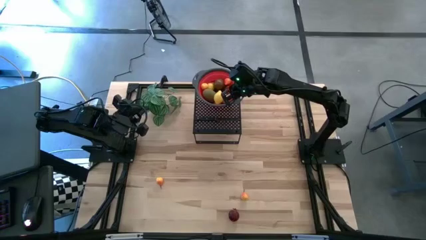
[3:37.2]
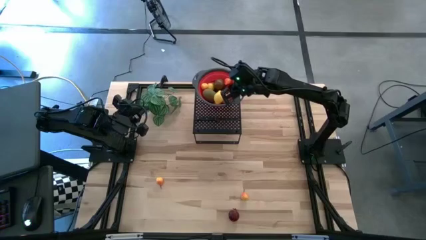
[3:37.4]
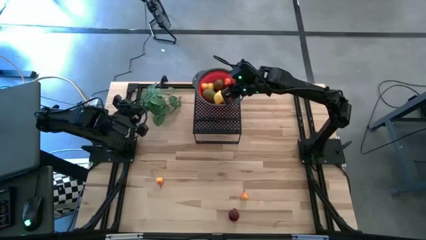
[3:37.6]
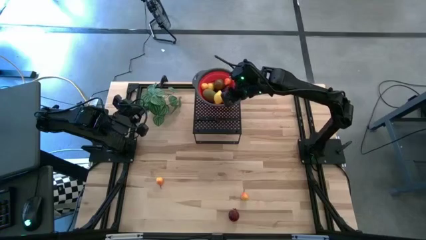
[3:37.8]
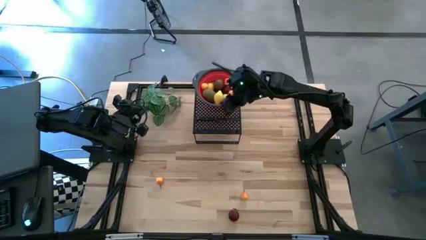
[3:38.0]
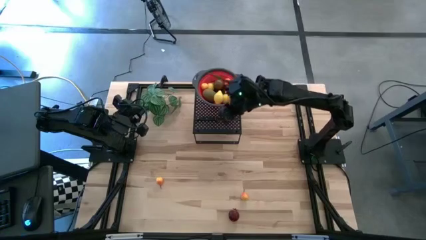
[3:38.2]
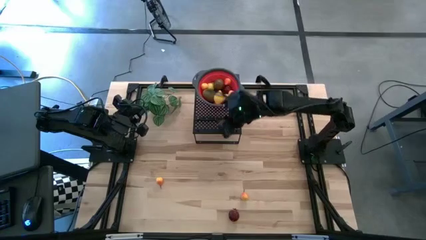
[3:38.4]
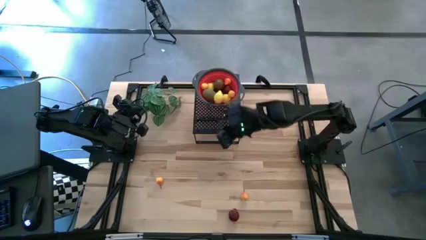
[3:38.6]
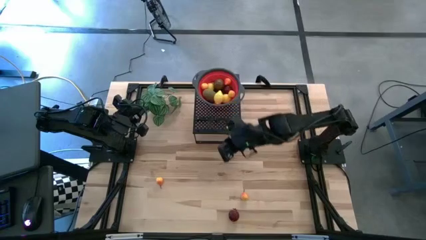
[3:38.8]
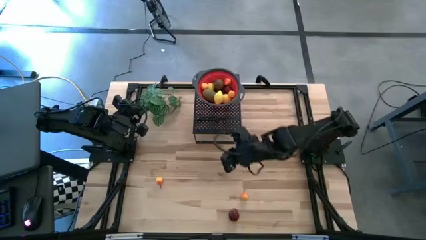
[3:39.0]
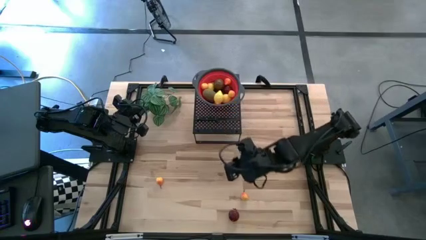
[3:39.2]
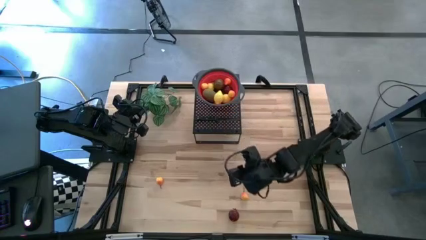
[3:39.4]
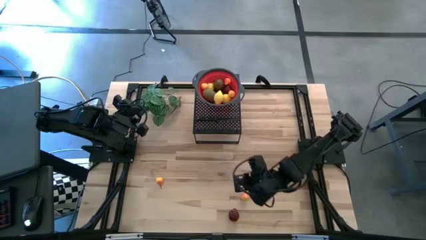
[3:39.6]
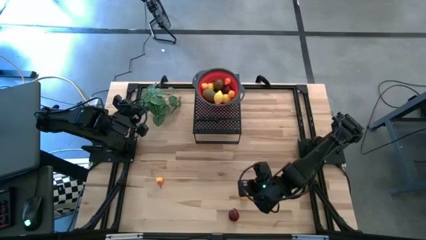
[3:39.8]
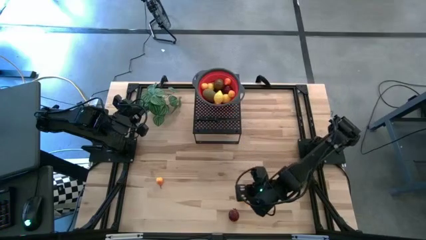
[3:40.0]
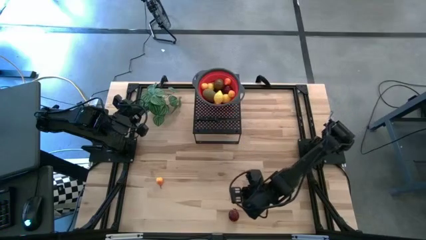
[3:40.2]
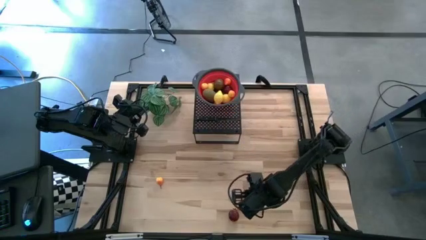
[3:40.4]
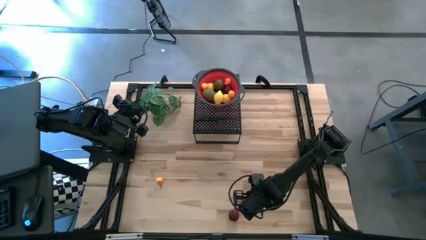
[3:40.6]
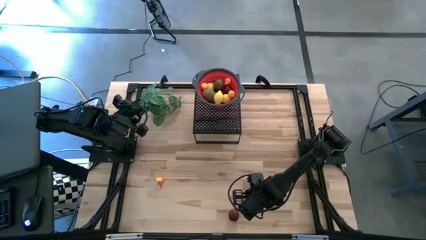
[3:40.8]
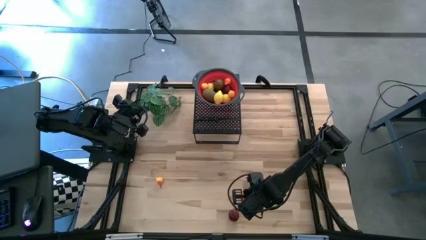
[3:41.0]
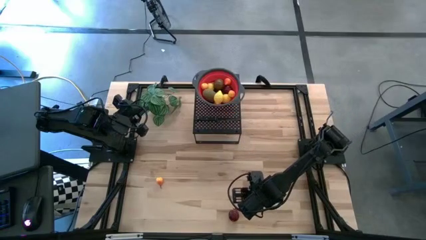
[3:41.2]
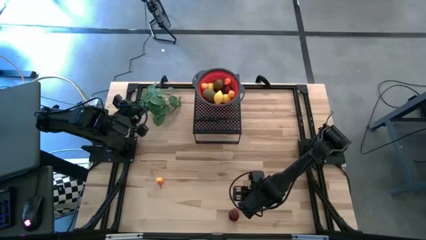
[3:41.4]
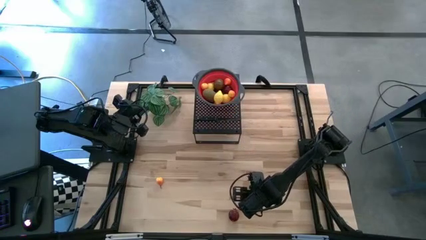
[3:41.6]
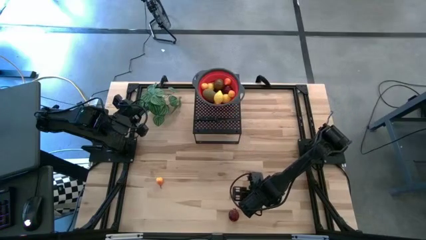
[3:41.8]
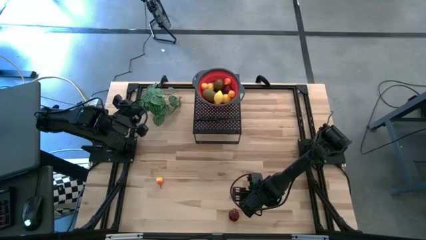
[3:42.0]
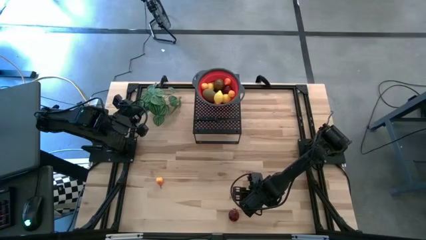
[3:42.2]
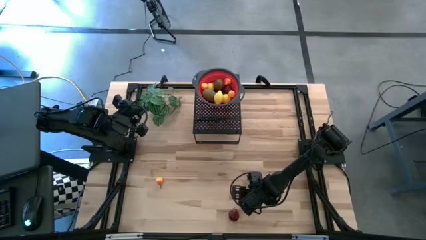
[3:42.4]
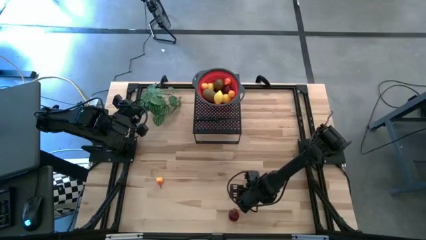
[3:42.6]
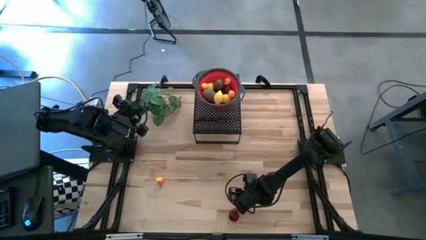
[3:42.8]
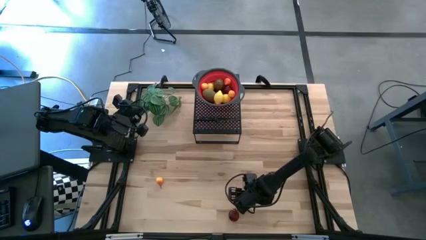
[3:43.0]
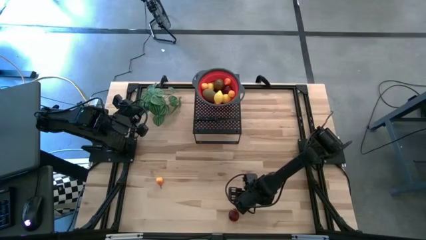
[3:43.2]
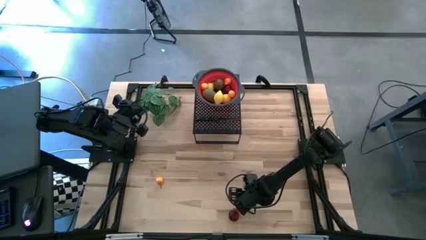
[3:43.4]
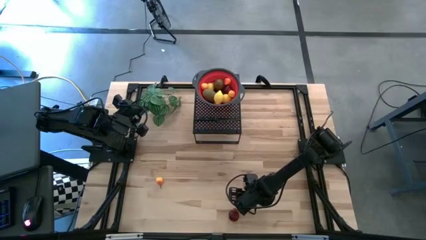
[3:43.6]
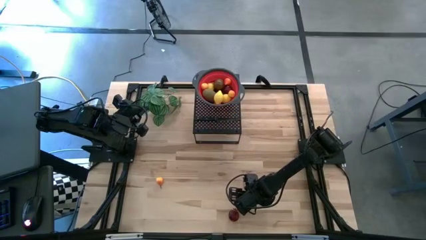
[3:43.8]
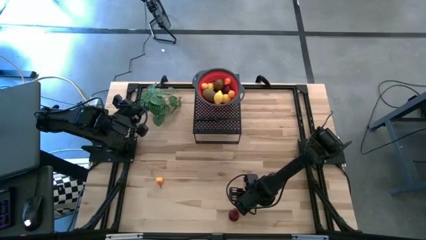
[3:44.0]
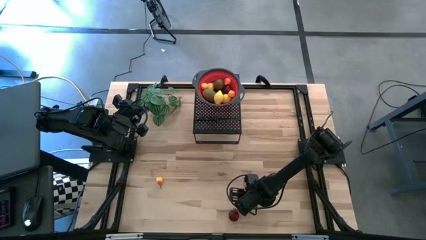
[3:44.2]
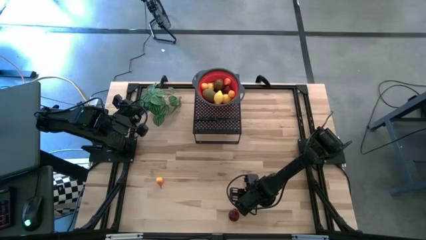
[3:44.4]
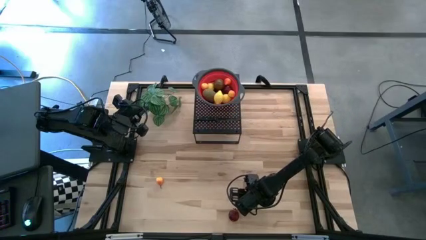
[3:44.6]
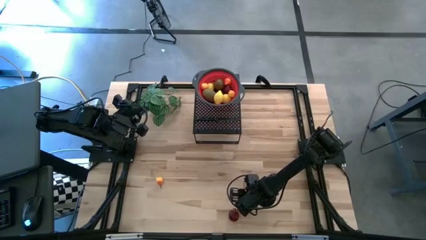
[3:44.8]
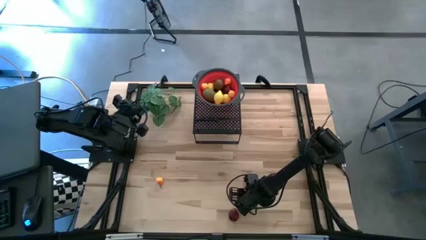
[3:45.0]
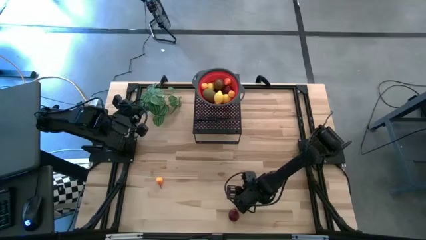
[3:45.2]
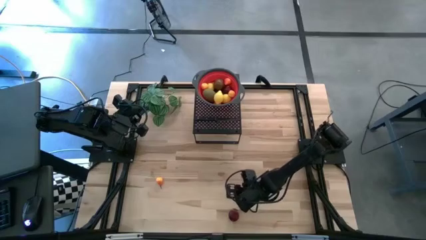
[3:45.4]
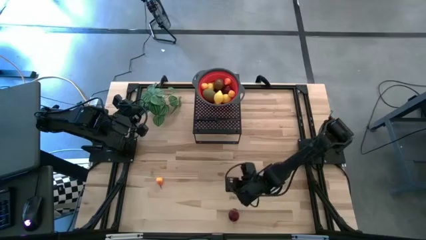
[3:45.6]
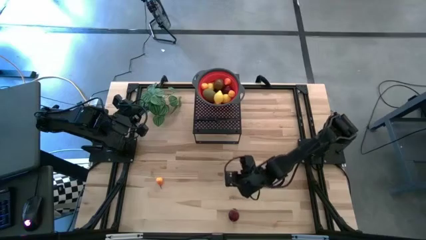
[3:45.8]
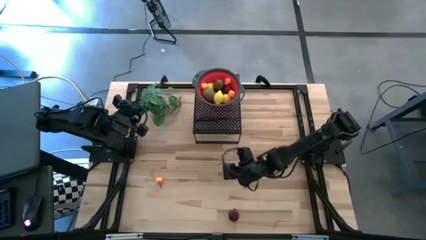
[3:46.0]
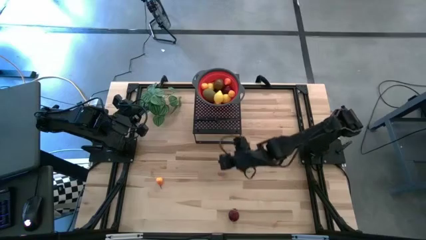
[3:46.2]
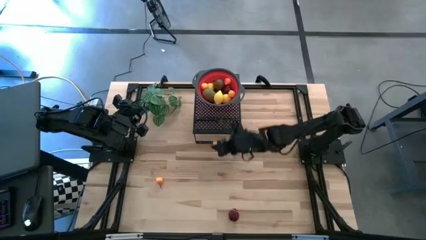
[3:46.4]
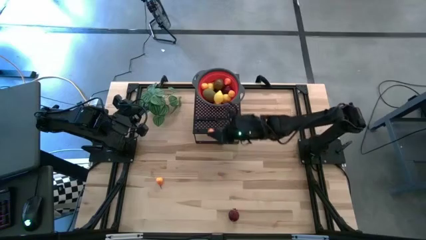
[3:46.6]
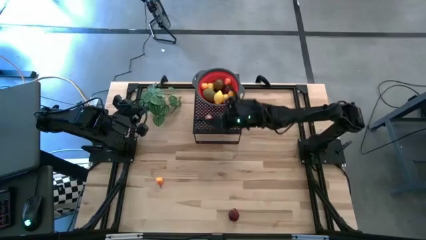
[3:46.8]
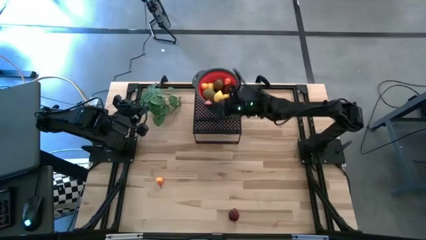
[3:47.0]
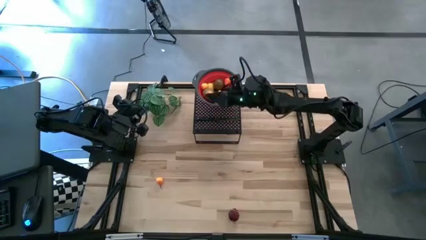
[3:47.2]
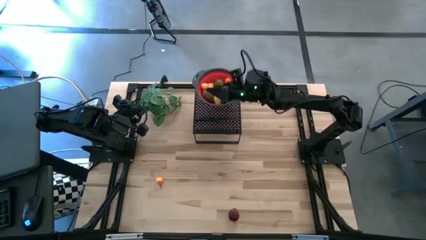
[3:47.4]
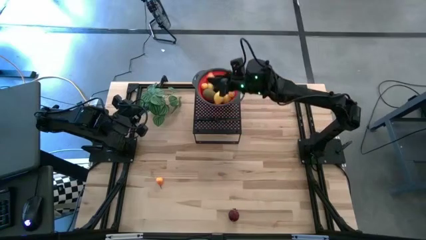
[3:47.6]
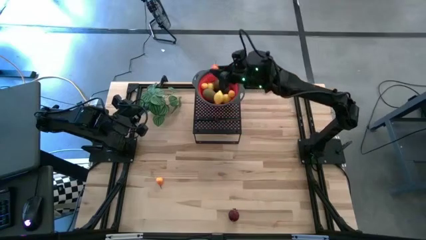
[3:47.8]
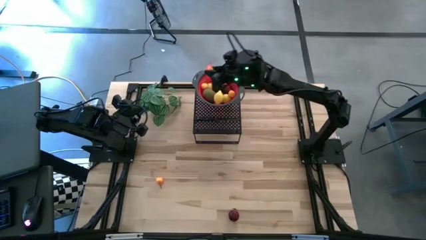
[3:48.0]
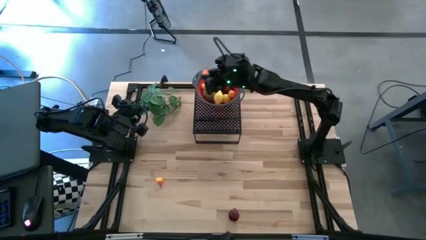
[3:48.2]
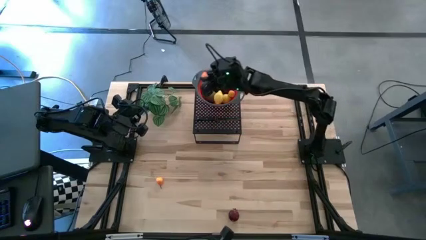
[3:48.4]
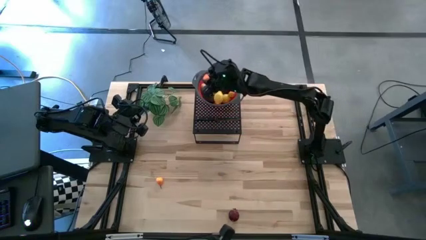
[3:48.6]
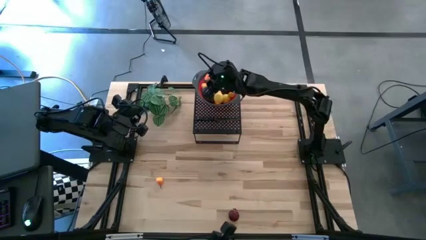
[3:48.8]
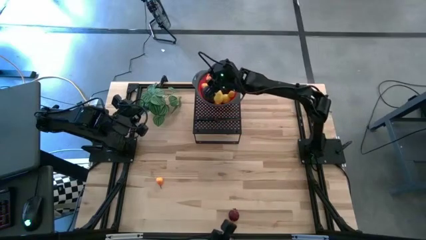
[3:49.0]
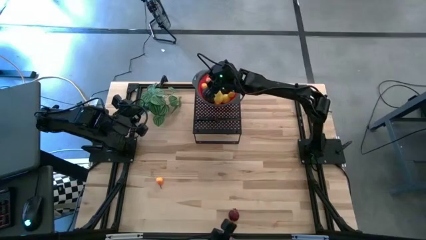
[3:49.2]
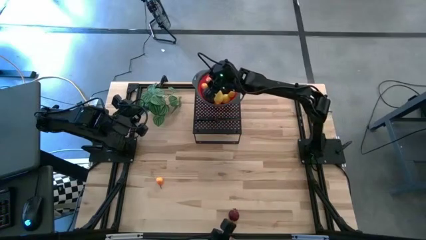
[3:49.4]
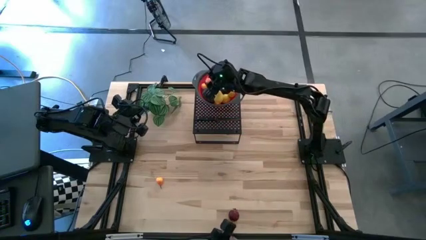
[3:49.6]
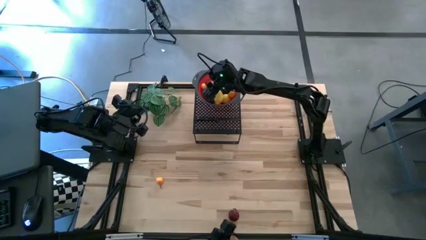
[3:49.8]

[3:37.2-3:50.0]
Task: Pick & Place Fruit
Put the pear into the red strainer bowl
